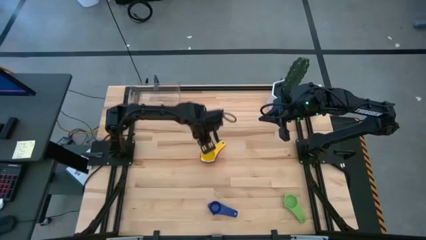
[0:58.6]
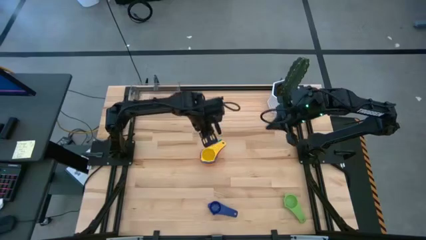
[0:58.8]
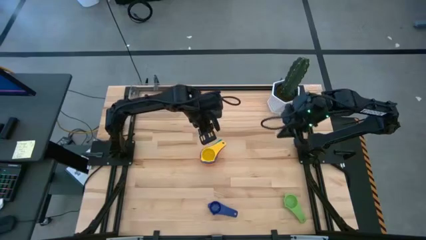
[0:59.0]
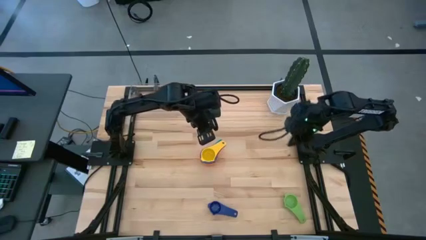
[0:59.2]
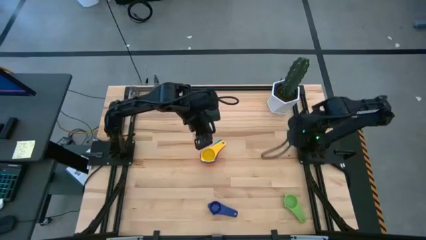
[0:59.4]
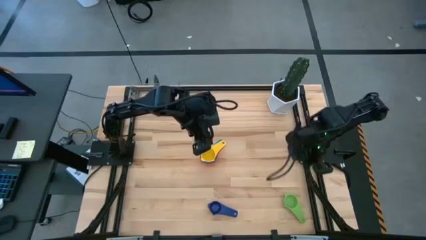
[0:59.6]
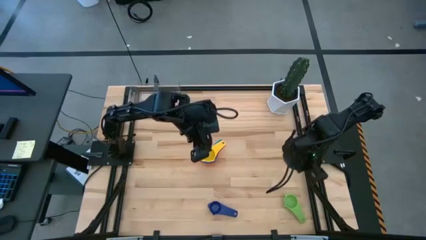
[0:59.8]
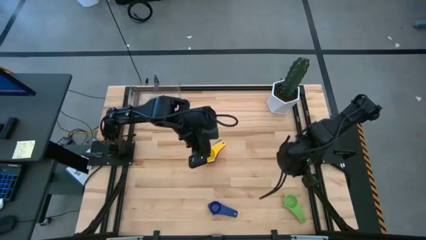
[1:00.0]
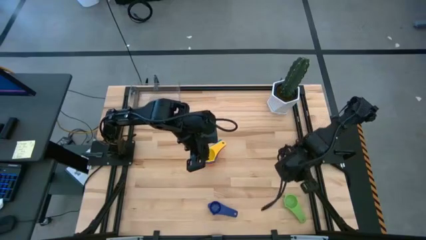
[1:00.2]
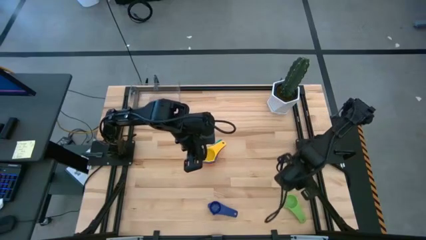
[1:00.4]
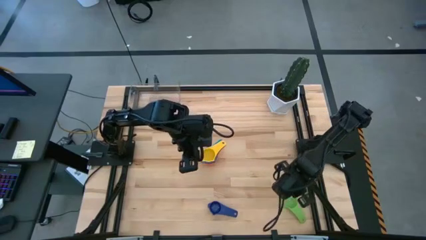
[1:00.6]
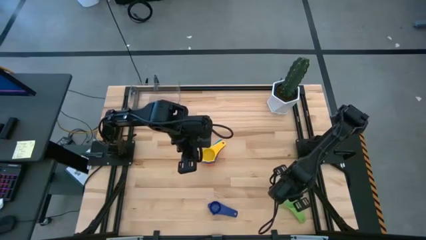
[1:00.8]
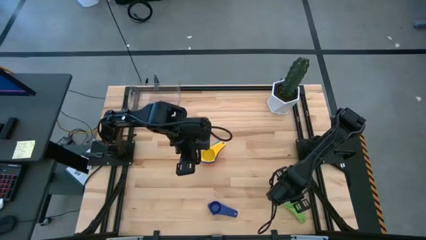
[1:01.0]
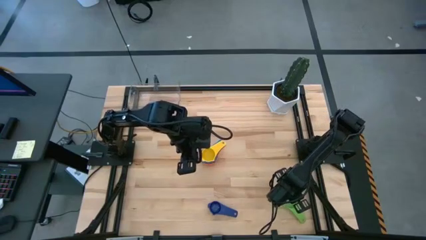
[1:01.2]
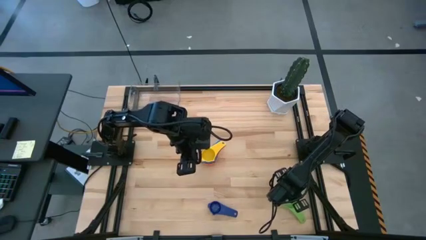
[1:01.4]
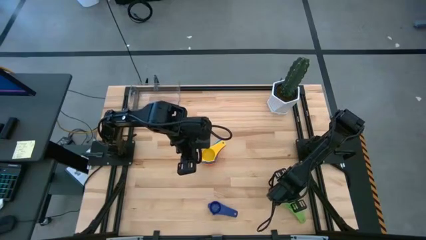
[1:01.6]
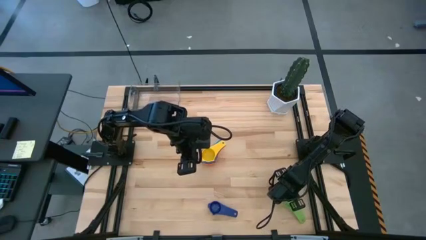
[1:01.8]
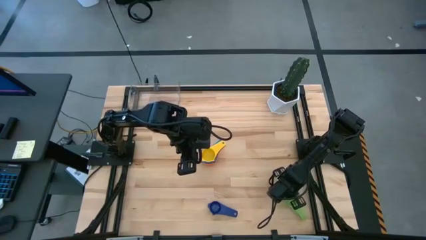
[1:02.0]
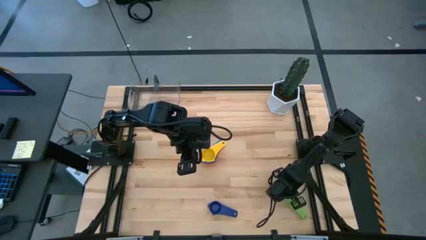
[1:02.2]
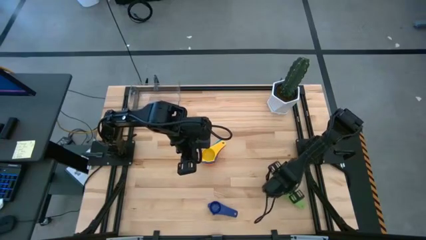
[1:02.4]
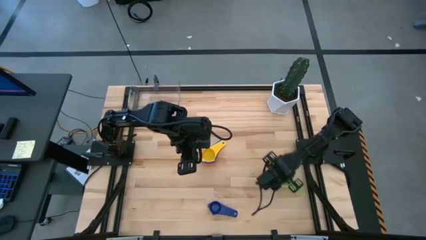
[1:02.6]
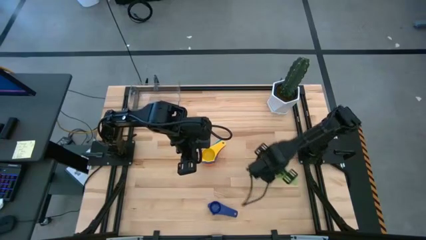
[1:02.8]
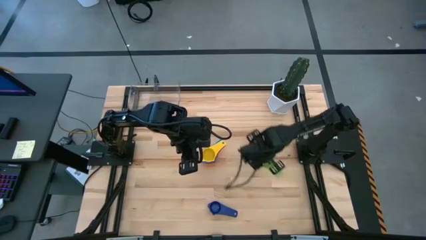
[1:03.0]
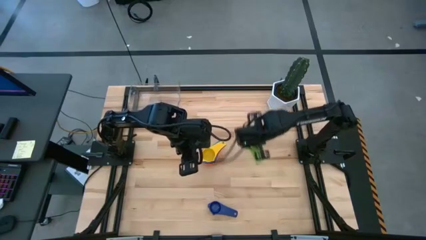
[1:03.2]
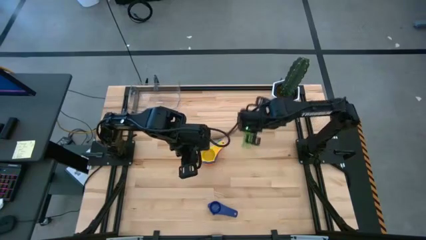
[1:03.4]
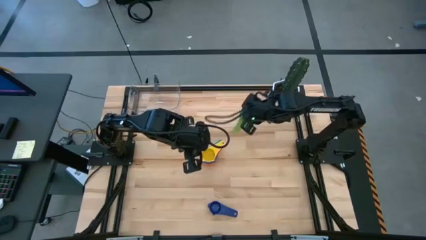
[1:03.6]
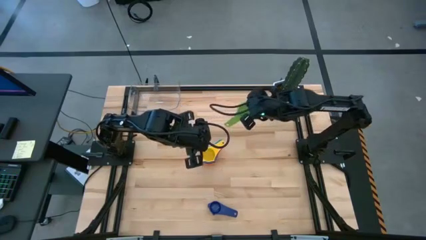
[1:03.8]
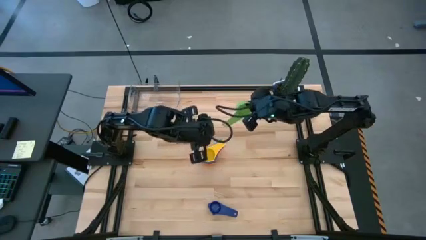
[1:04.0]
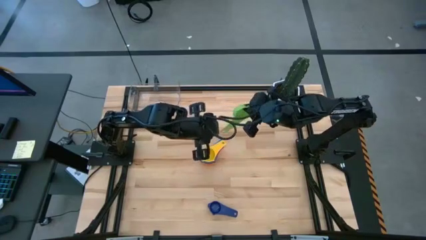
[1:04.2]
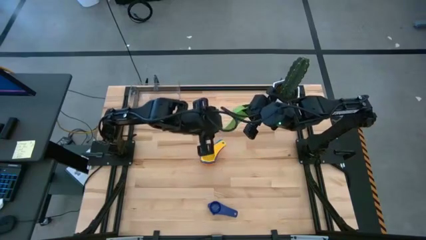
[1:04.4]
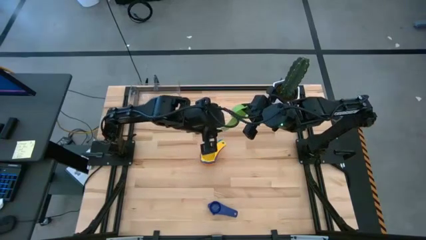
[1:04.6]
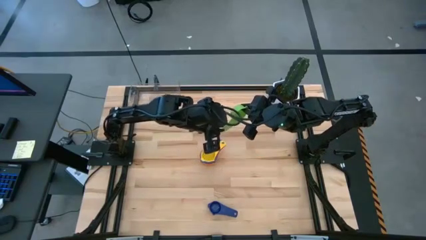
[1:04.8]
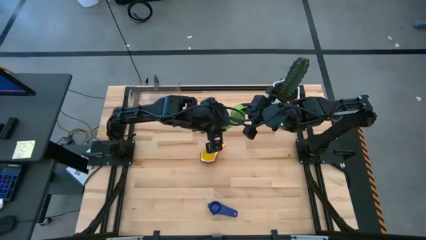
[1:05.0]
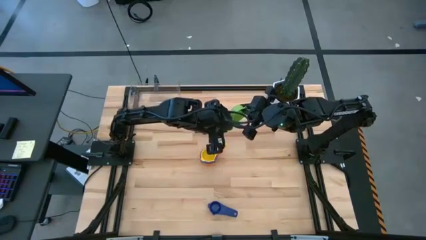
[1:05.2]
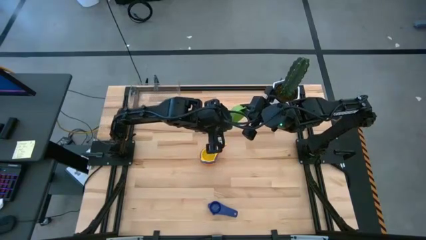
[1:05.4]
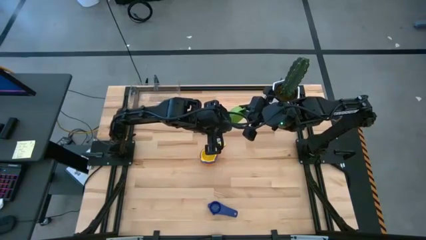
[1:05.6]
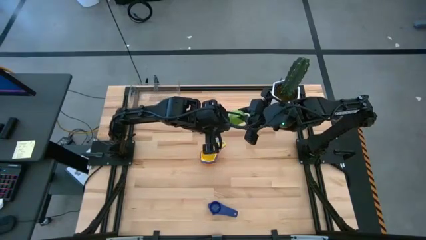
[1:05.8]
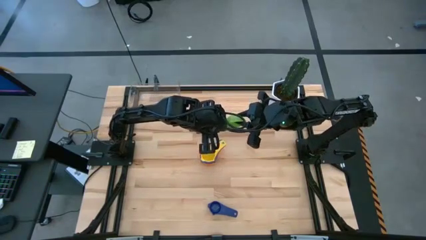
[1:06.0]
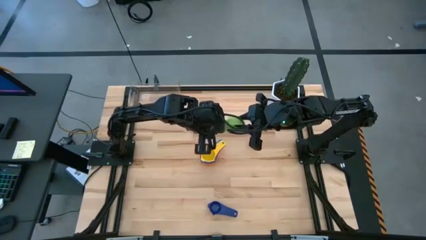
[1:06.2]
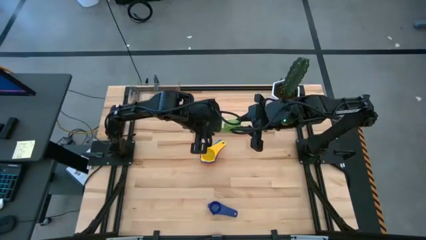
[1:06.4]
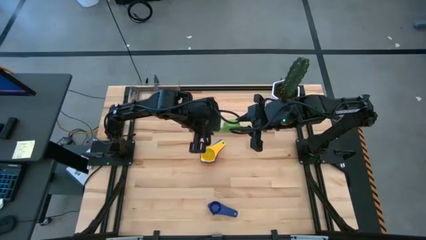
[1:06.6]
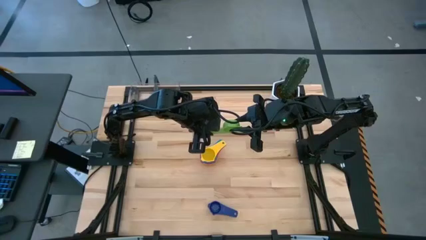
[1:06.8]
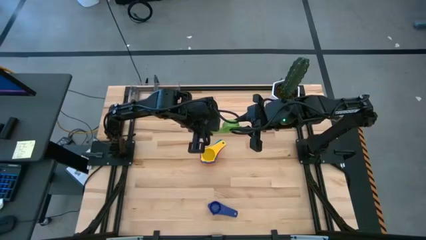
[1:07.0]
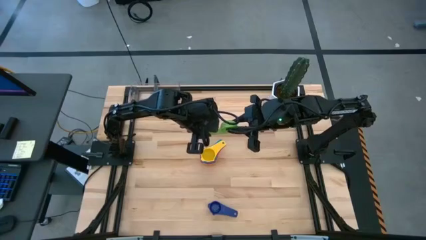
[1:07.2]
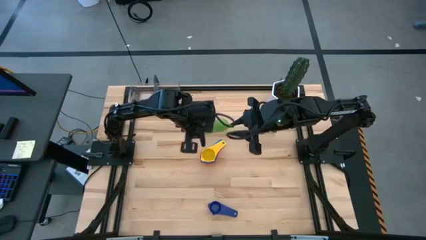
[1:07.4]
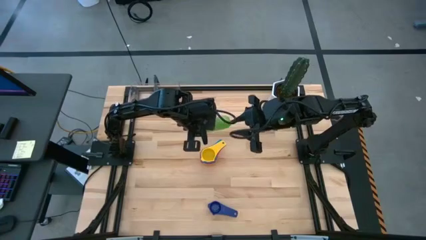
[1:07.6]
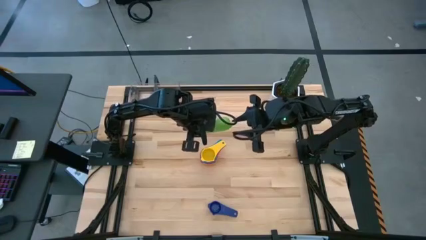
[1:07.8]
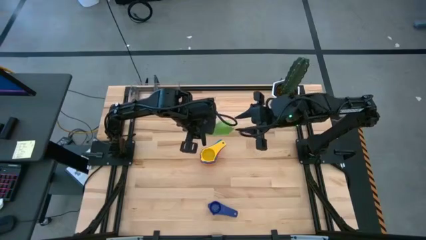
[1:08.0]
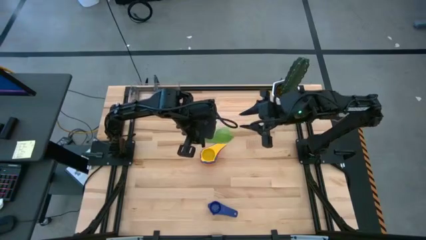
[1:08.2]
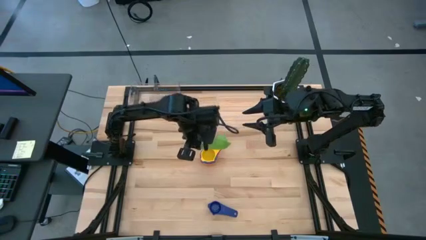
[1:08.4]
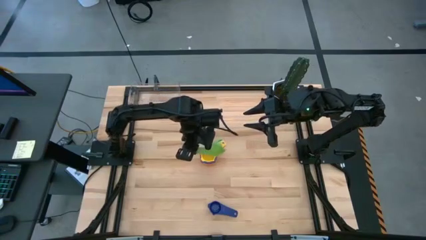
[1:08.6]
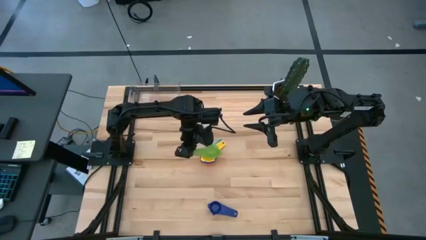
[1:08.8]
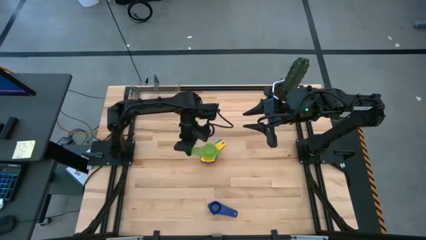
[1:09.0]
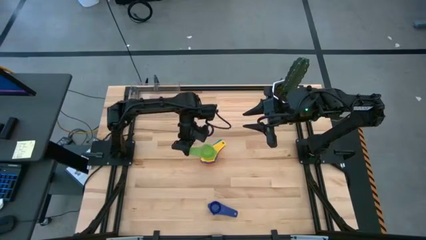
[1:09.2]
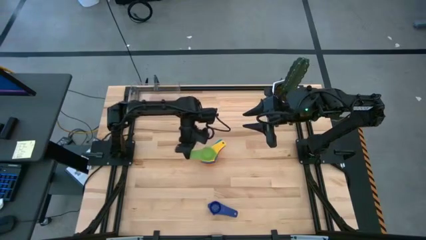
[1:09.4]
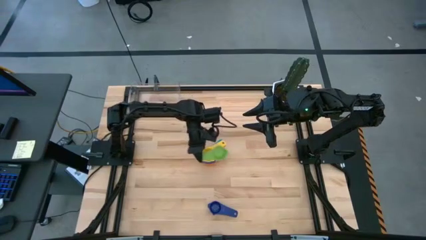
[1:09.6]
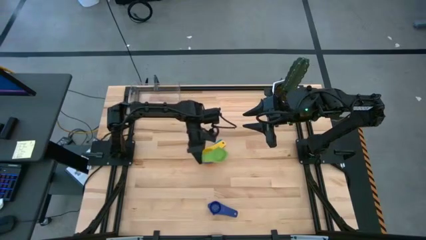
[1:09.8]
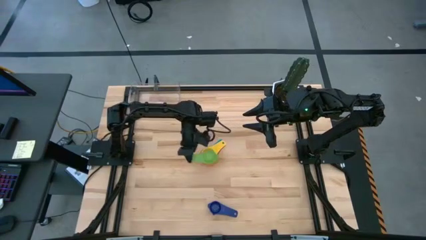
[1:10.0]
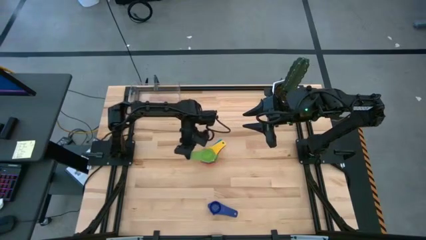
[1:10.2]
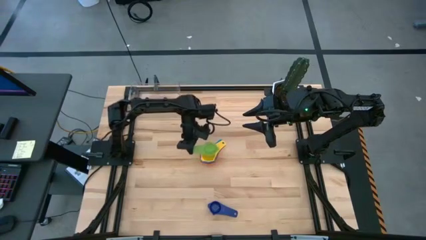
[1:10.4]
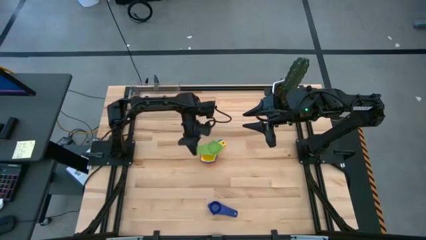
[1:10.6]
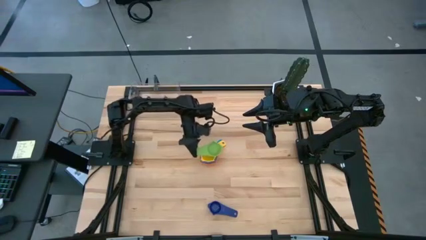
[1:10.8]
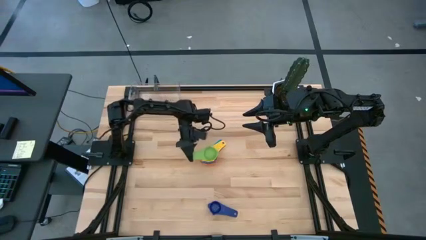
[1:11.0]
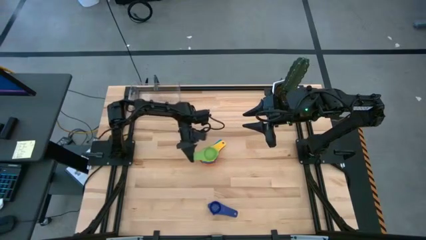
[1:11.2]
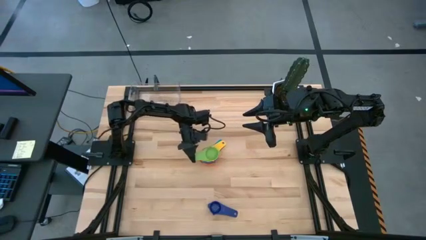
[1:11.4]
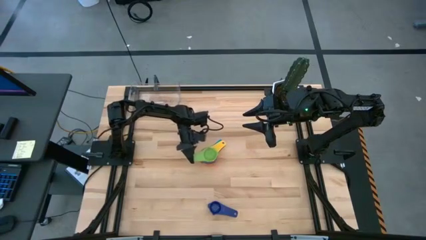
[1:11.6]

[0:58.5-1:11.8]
Task: Nest measuring cups in basket
Stack the green nest measuring cup on top of the yellow nest measuring cup
